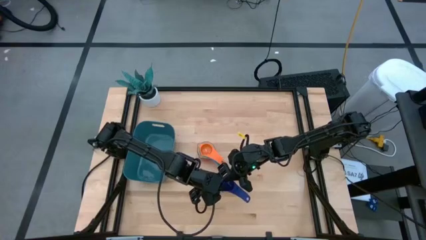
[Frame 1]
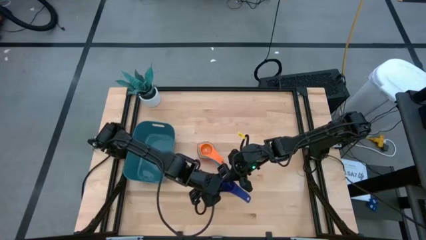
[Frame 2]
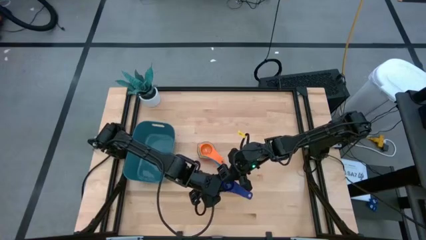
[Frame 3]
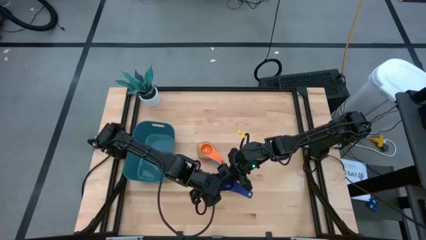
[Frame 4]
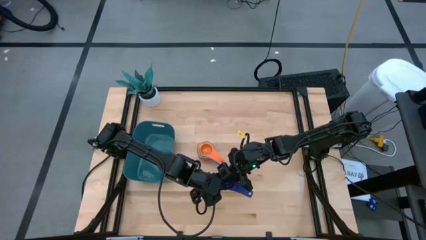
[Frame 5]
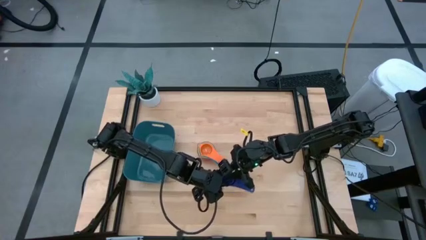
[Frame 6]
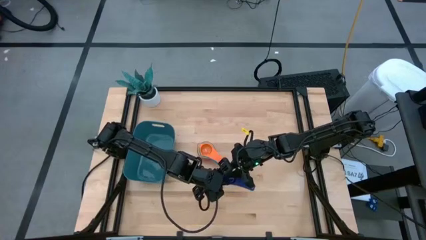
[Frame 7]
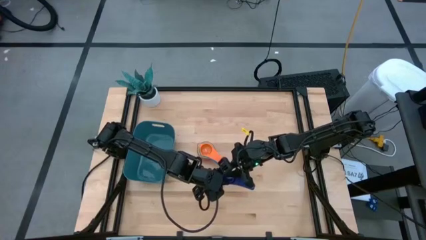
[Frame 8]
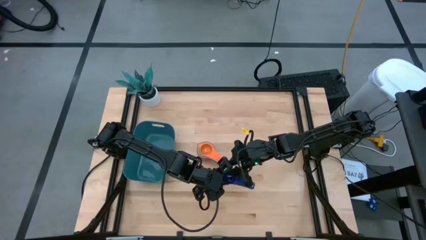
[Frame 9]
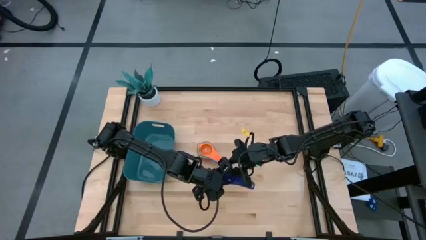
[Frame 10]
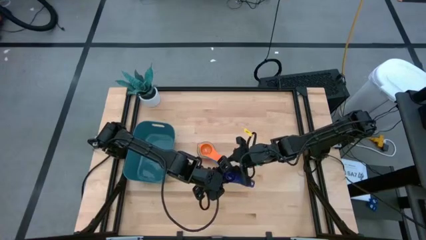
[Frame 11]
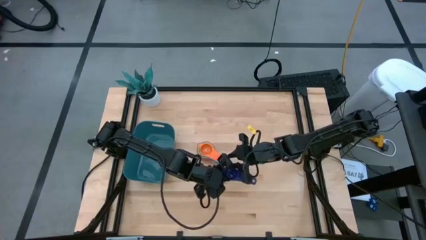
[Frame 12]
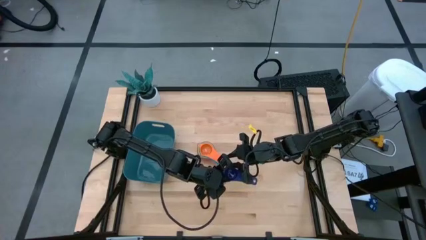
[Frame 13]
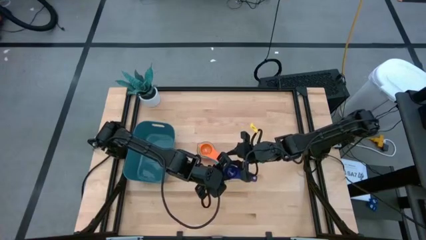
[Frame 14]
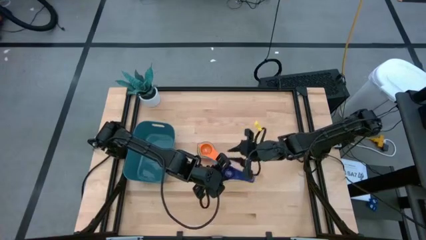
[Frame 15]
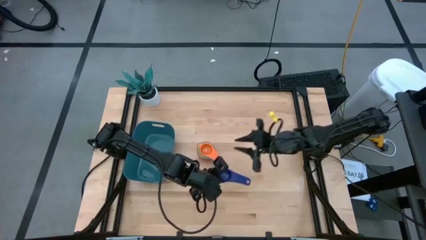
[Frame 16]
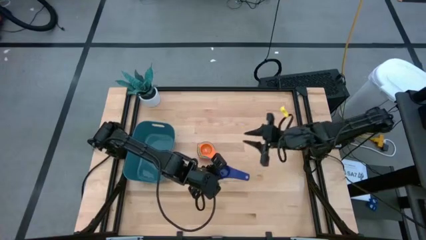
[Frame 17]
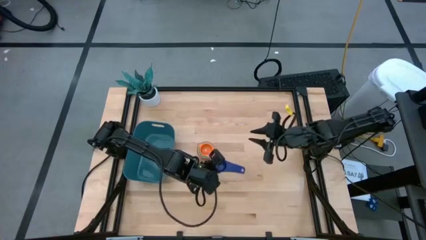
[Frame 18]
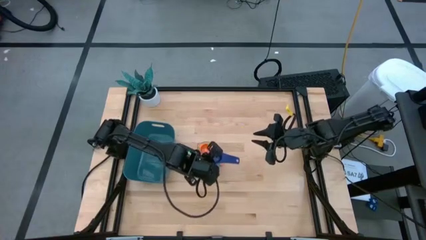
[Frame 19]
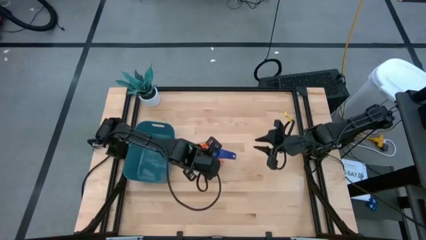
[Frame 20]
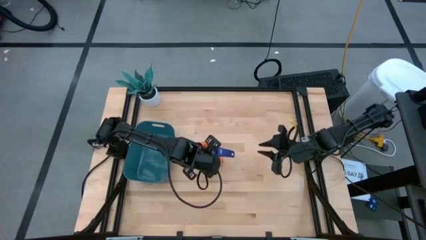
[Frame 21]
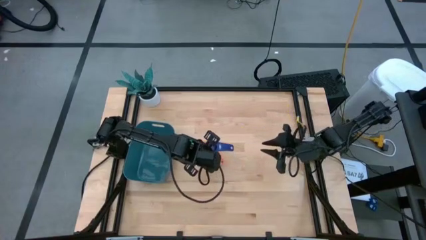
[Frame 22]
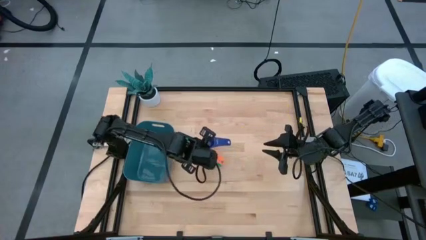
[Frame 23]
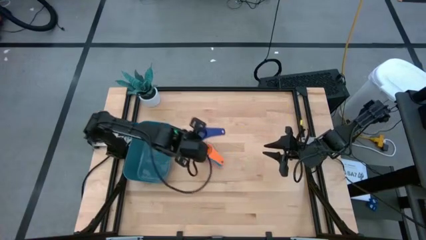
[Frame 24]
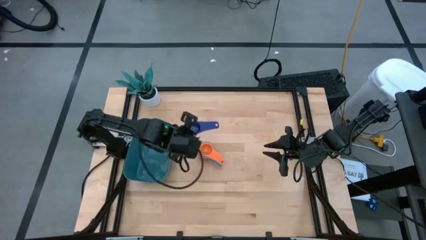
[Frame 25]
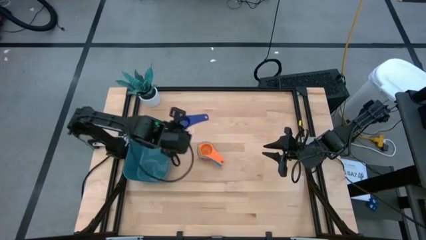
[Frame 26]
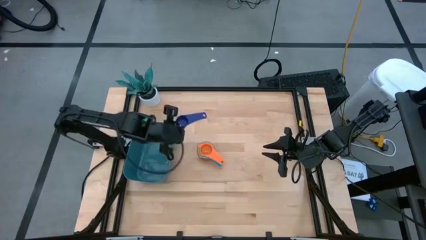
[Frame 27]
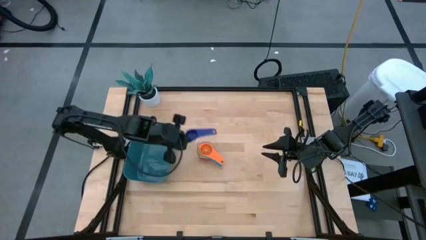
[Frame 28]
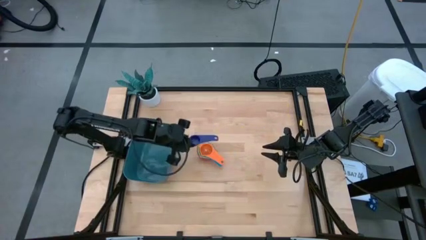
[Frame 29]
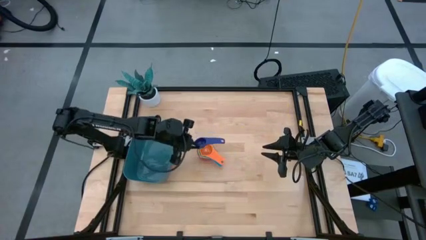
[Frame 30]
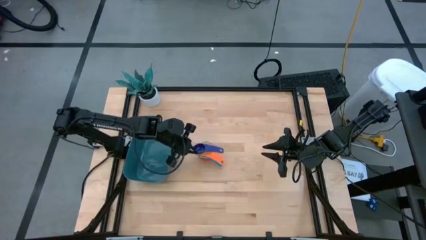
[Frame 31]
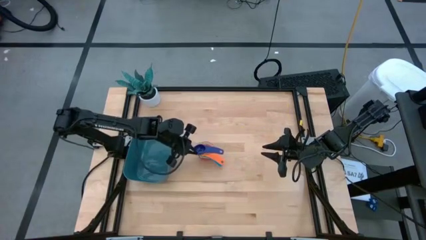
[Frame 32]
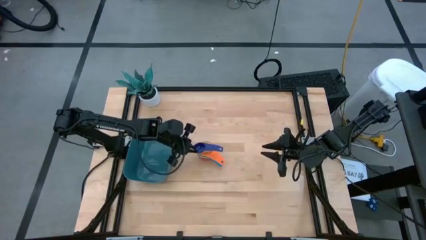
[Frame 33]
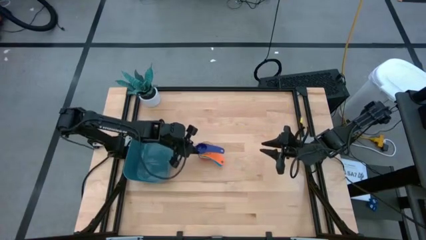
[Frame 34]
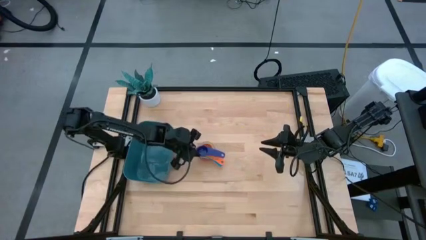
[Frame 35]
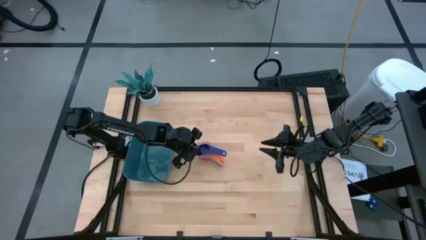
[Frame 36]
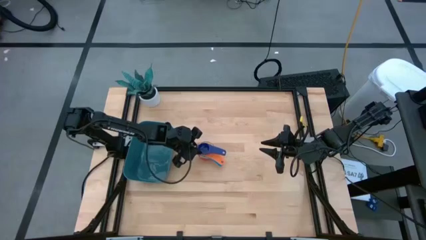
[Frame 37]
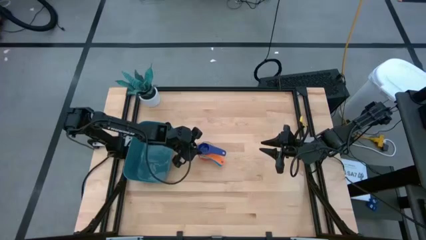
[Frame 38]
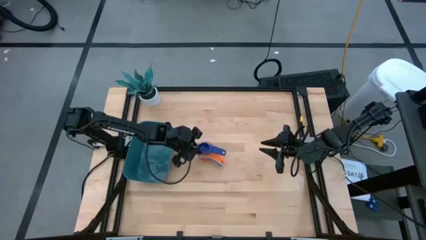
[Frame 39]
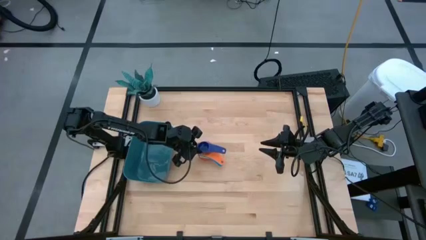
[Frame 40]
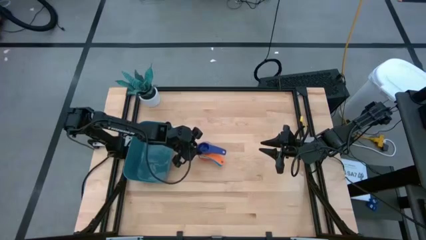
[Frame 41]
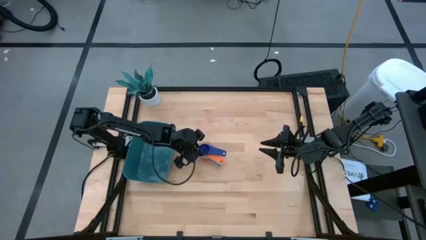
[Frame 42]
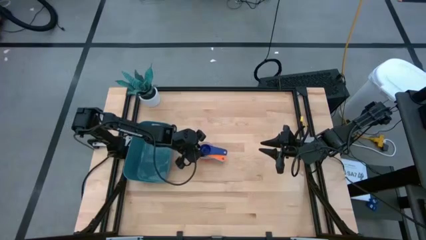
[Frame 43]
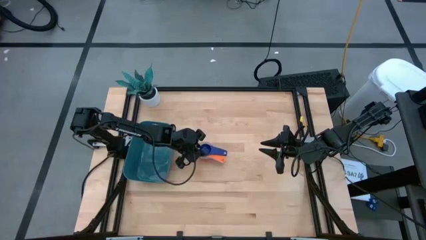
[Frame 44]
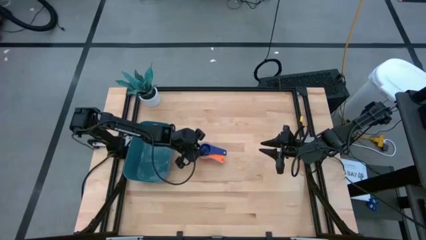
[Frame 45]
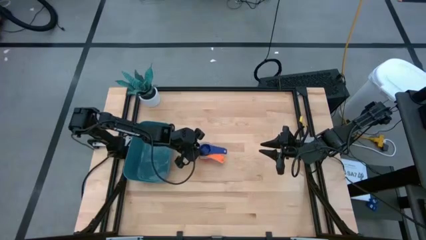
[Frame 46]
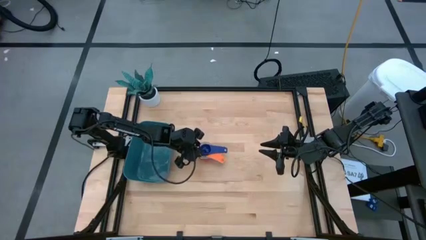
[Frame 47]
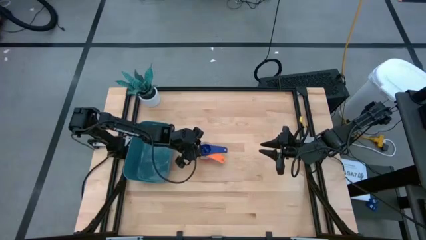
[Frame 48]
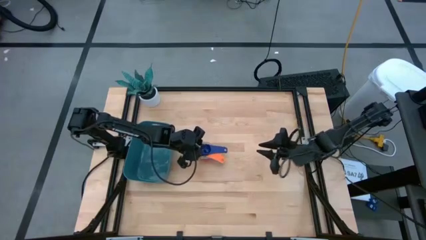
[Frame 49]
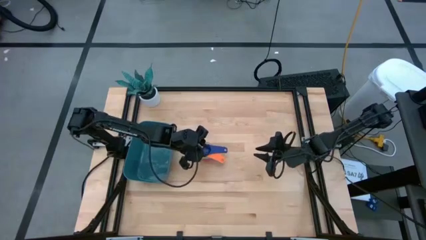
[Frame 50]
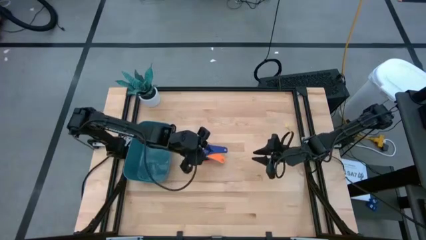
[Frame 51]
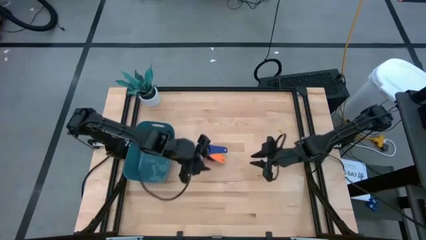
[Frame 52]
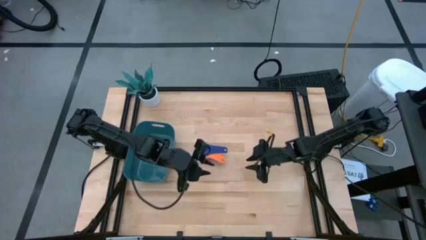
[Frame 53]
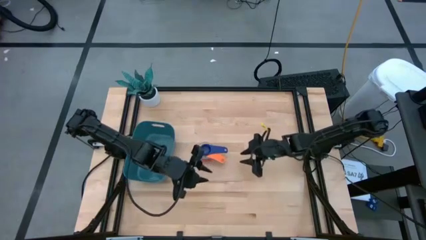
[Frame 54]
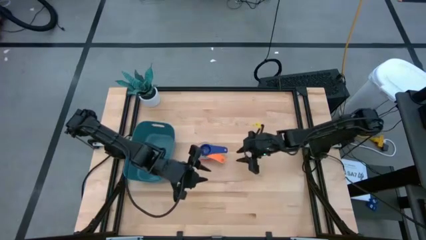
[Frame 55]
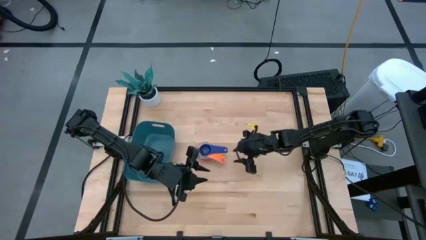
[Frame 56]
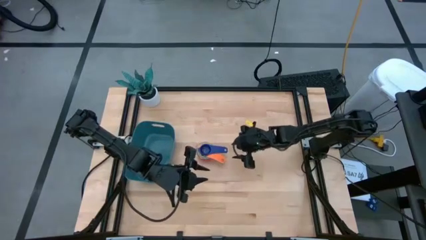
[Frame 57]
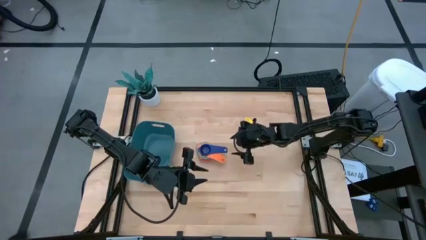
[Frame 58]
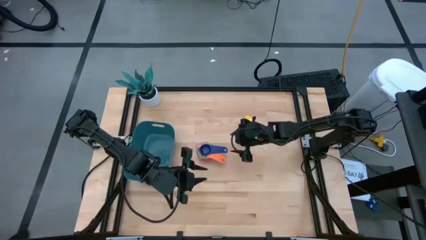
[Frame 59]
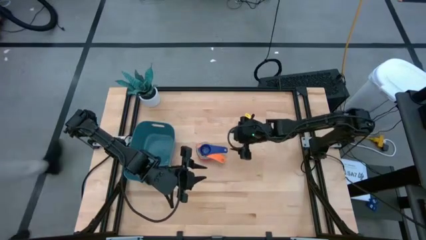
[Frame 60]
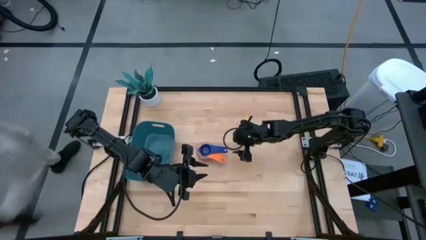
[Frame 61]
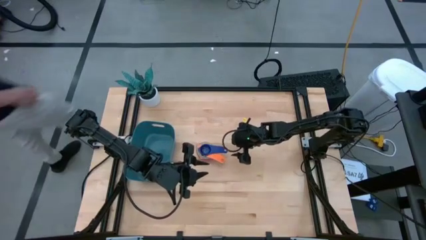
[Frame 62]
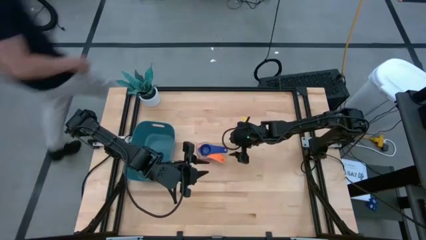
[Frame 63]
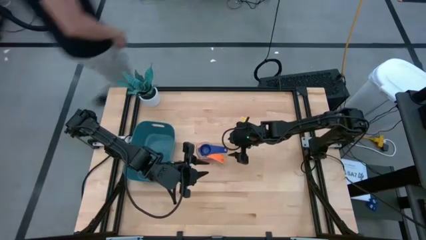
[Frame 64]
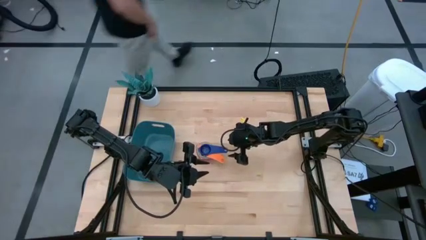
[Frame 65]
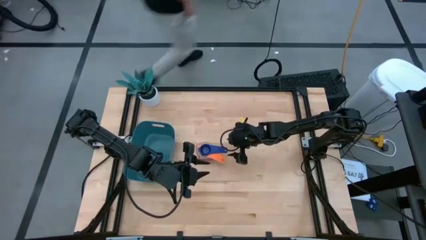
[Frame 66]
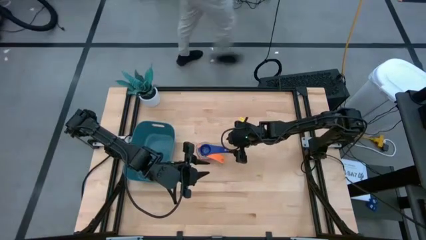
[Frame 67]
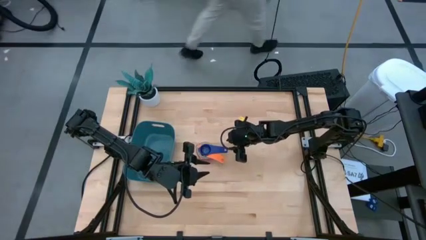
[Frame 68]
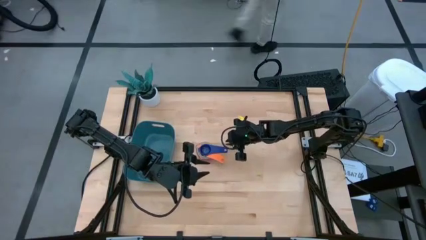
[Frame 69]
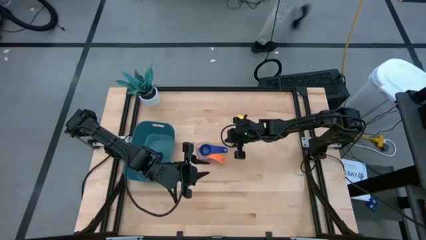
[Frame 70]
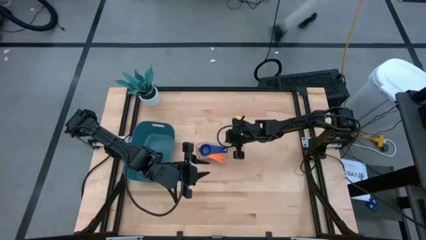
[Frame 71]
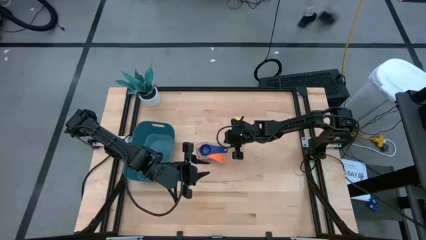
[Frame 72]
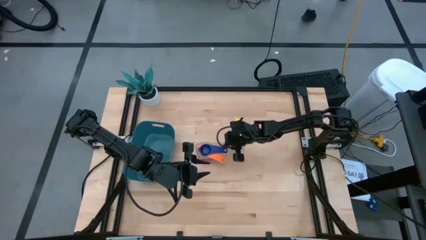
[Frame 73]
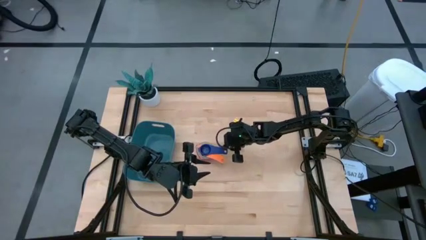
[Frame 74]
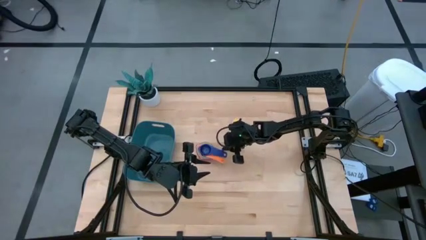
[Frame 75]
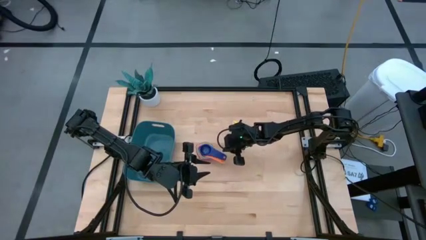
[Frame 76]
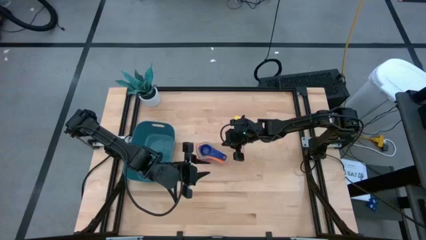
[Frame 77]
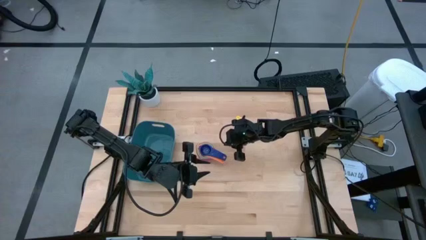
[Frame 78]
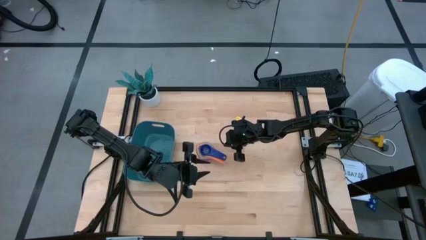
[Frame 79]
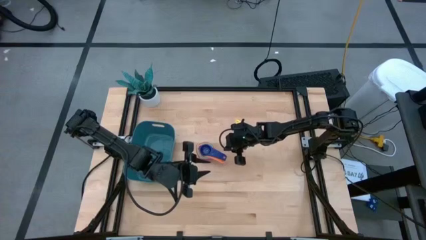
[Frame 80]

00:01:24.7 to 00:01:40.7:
Task: Nest measuring cups in basket
Stack the dark blue measuring cup on top of the orange measuring cup
